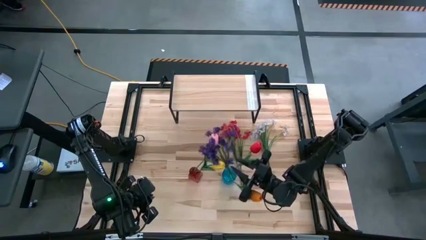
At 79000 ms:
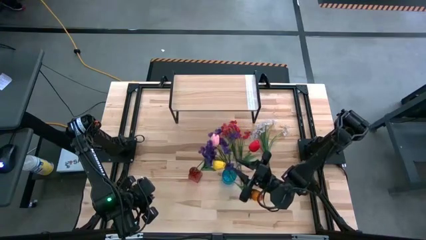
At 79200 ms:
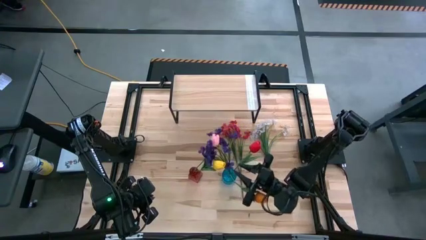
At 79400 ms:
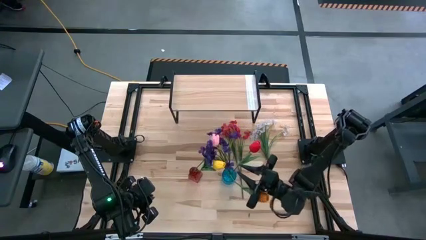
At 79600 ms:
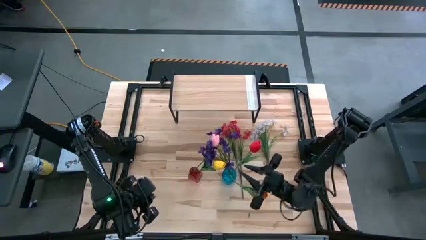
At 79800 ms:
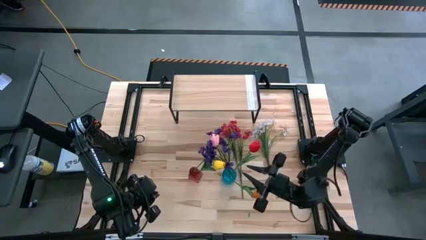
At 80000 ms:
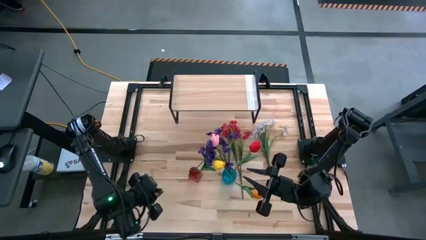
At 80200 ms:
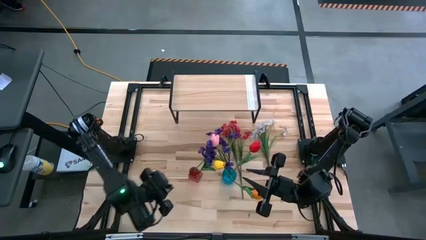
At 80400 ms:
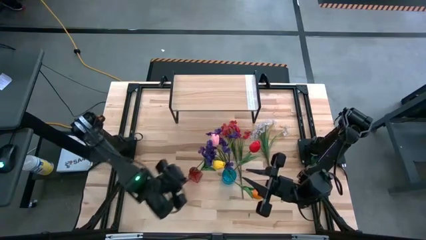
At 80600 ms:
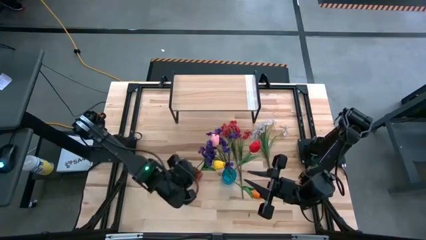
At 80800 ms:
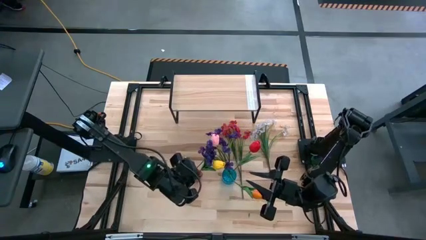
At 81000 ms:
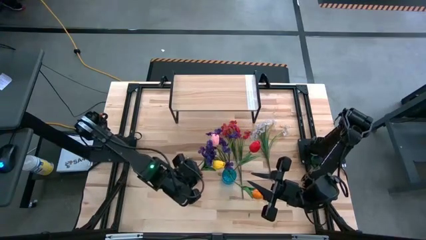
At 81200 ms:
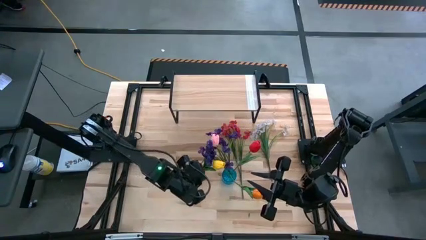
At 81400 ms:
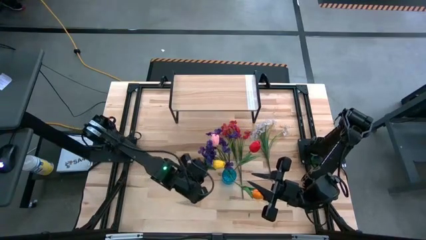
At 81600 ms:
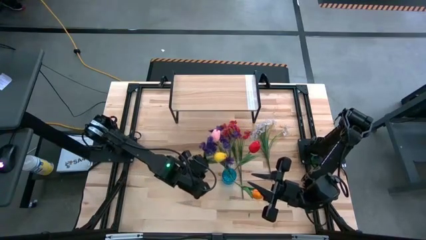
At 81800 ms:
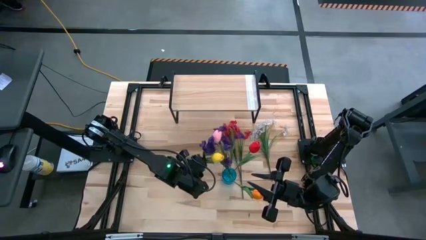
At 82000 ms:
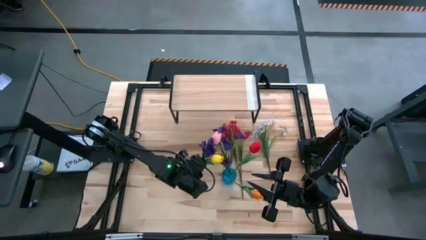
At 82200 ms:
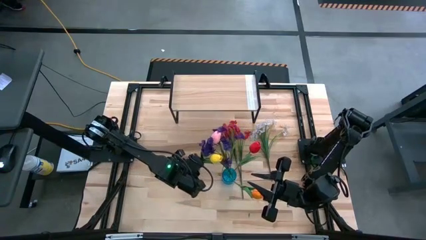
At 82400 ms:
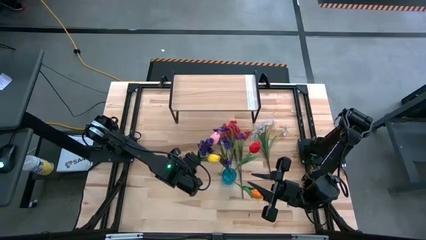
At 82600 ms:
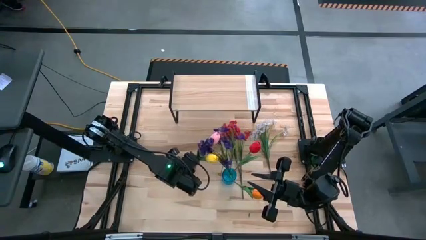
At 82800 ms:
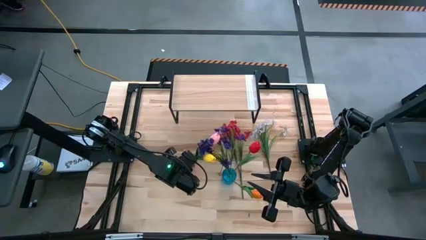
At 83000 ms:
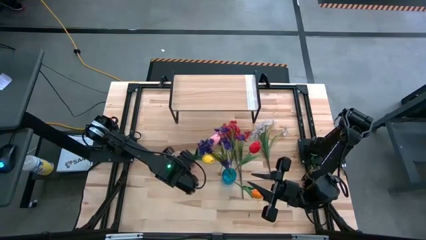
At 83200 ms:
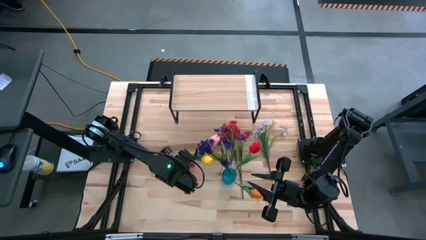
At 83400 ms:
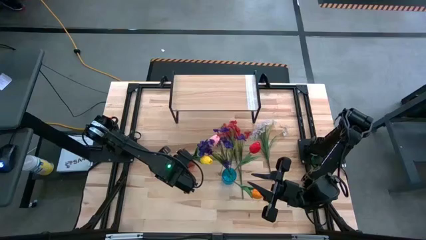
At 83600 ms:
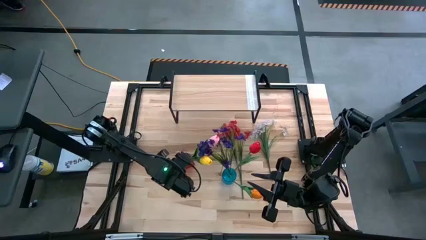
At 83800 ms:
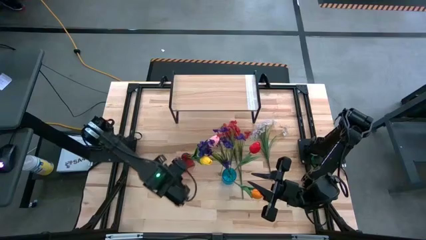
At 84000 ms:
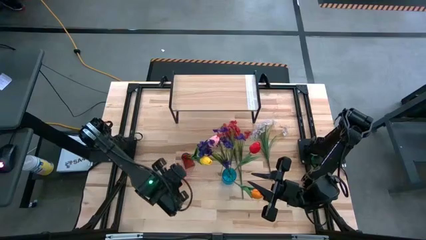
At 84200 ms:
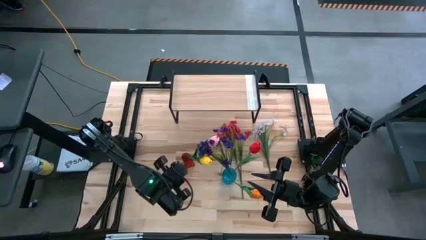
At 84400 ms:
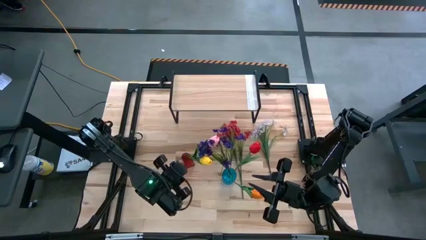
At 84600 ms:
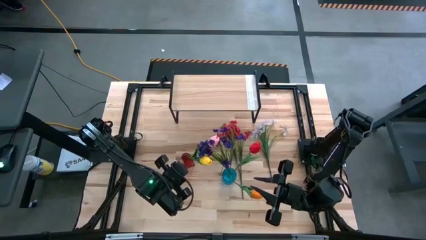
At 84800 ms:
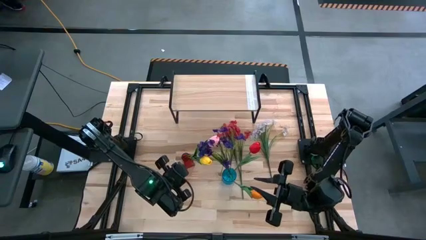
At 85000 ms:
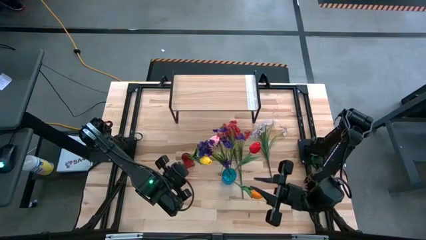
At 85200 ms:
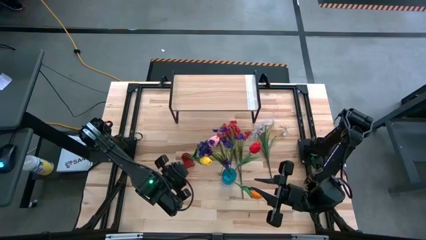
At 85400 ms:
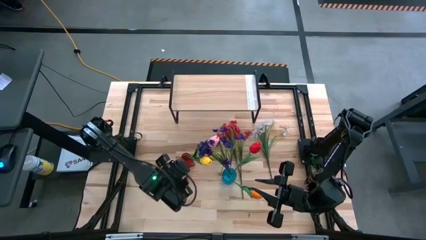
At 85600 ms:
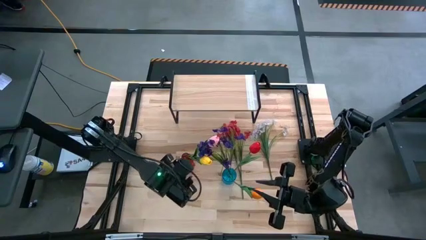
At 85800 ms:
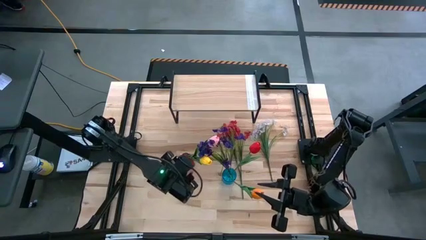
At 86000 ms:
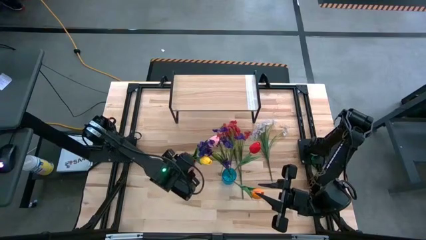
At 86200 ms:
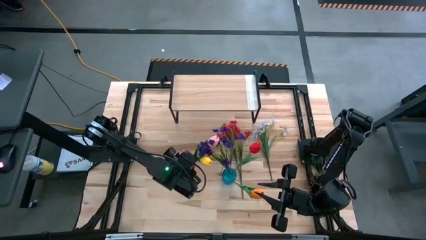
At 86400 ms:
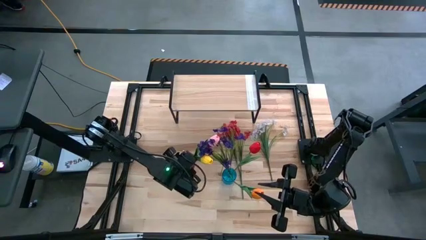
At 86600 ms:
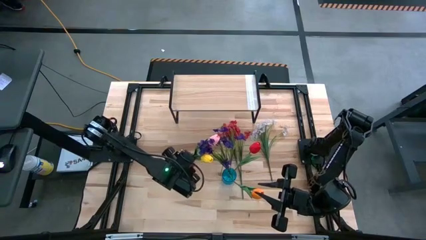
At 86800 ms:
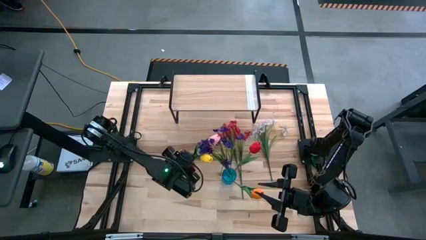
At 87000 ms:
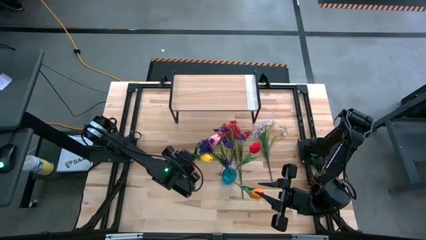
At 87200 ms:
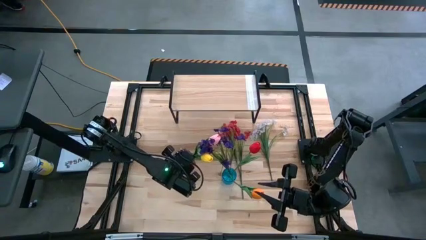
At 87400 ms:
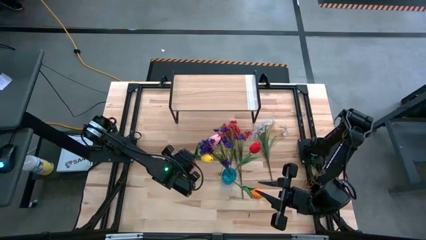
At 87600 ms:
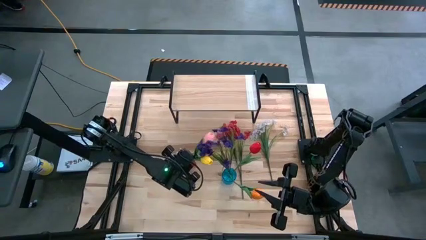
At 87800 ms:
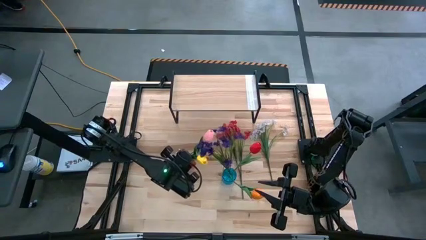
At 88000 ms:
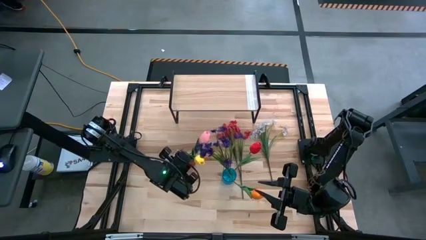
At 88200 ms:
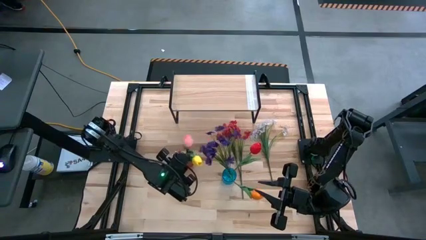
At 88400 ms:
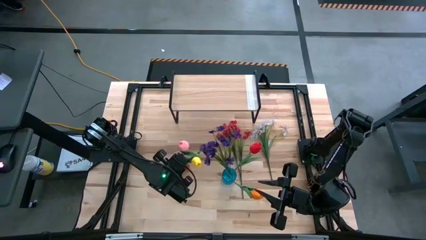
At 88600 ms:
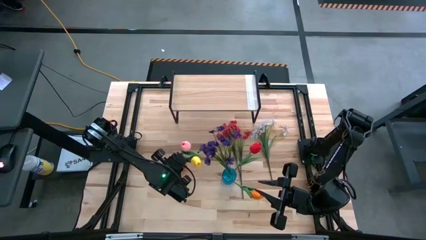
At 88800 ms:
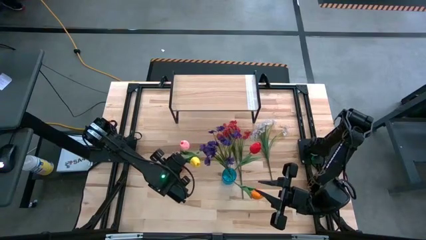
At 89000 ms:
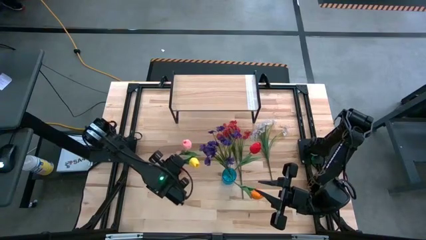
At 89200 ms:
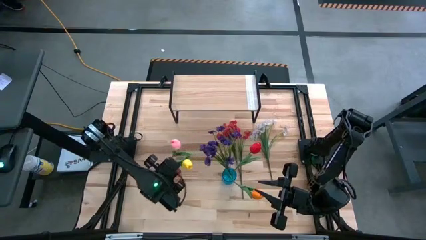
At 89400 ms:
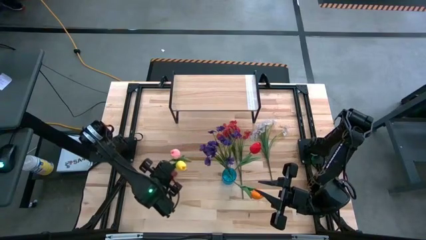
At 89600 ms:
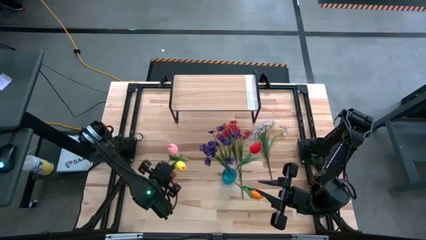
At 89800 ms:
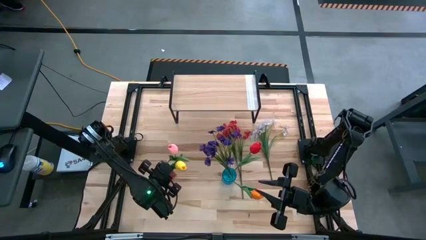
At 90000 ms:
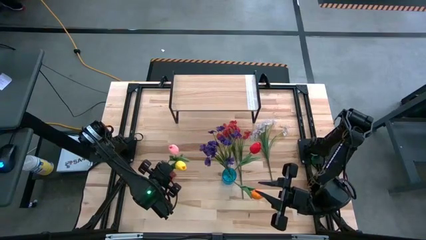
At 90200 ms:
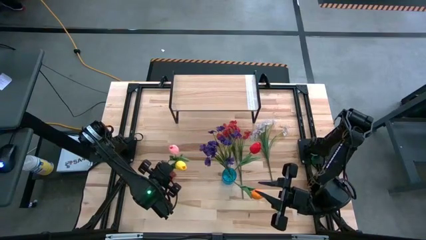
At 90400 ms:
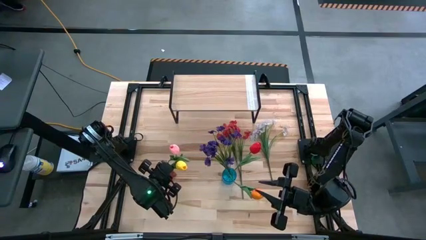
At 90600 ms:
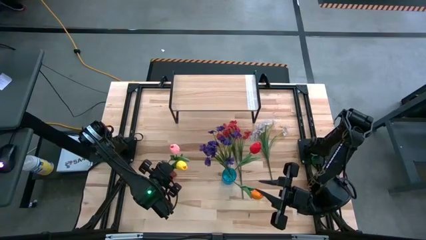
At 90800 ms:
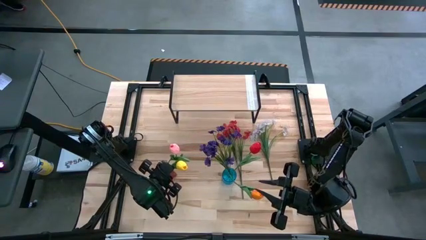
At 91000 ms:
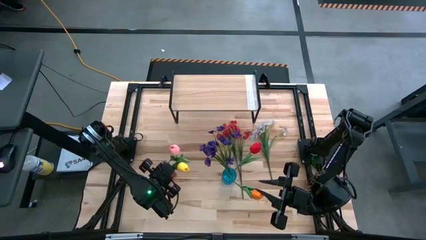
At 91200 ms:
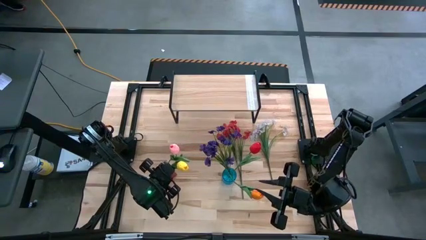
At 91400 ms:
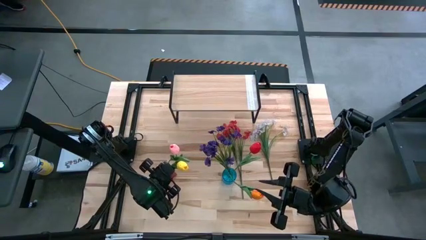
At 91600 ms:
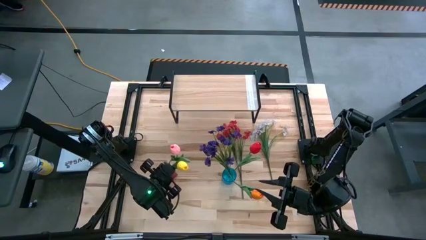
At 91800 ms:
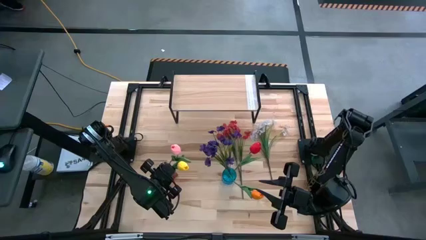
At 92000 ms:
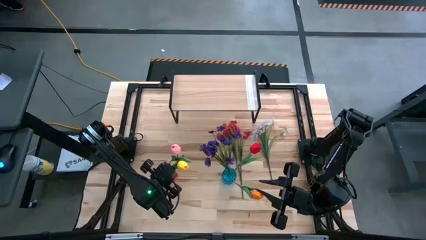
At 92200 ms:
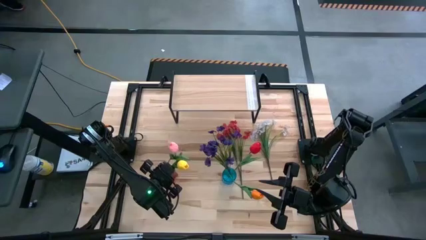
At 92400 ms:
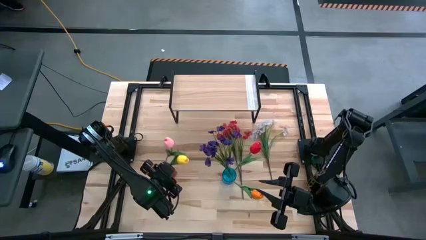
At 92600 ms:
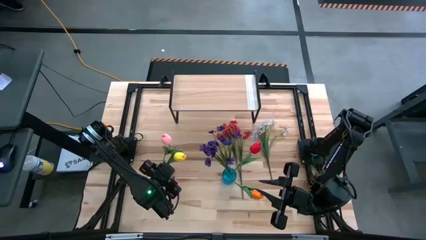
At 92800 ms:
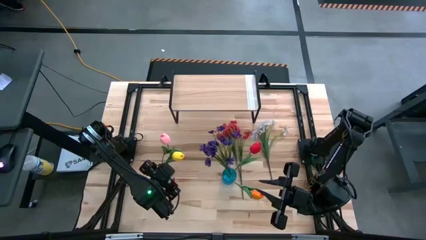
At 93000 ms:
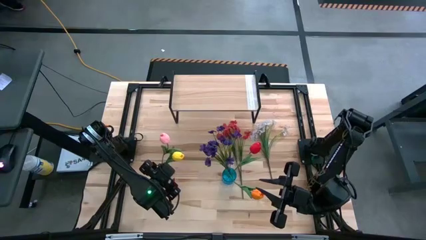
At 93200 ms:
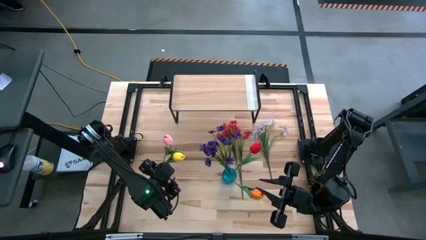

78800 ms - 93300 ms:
Task: Pick and place flowers into a vace then onto a shelf
Move the red vase to the left of the table
